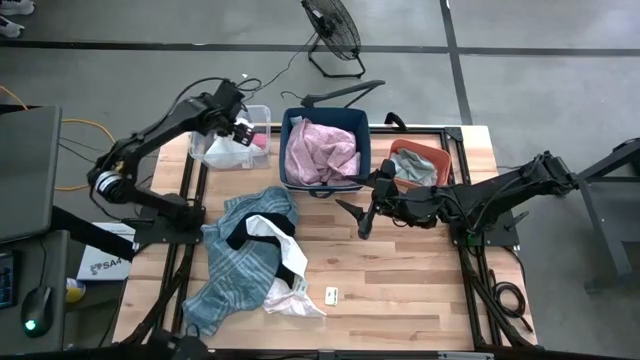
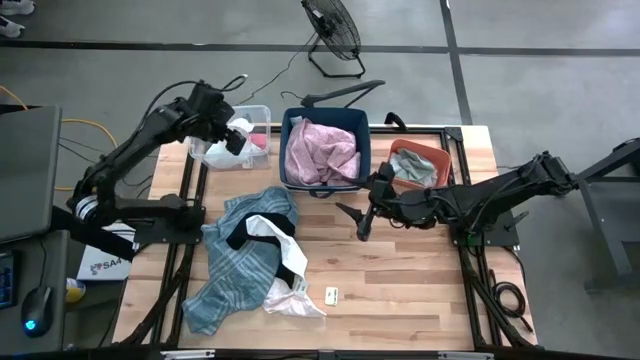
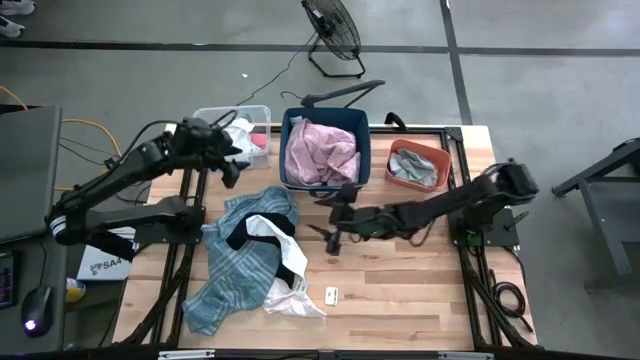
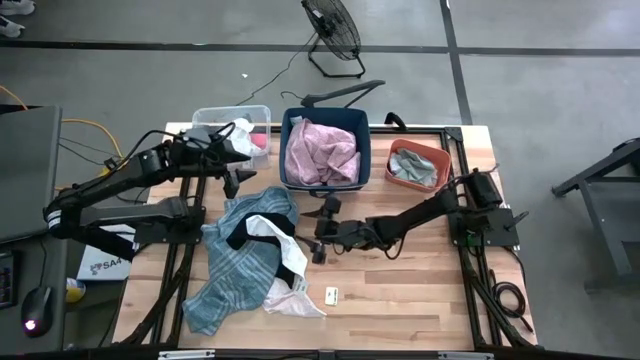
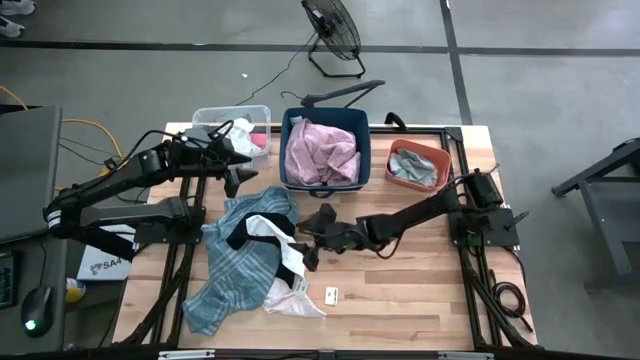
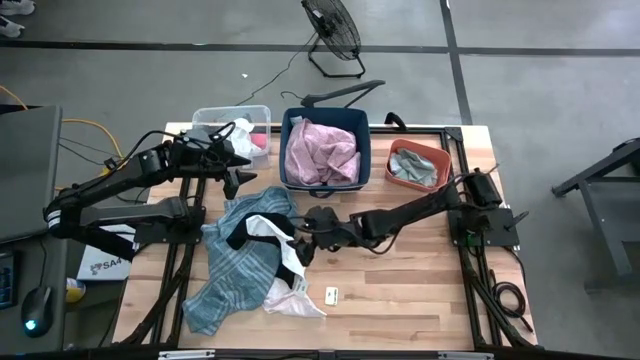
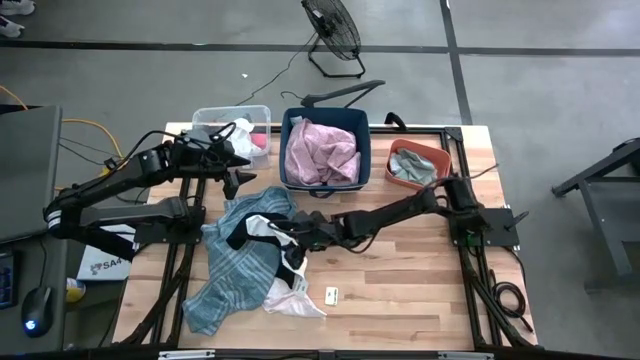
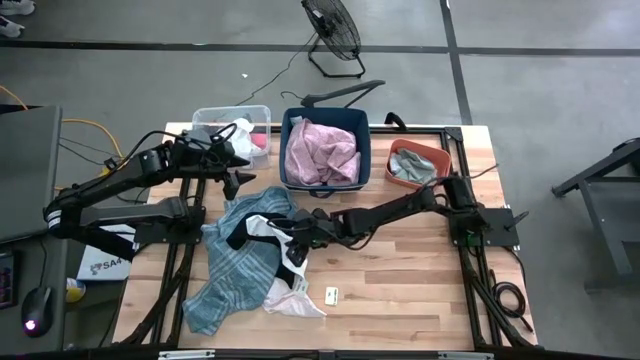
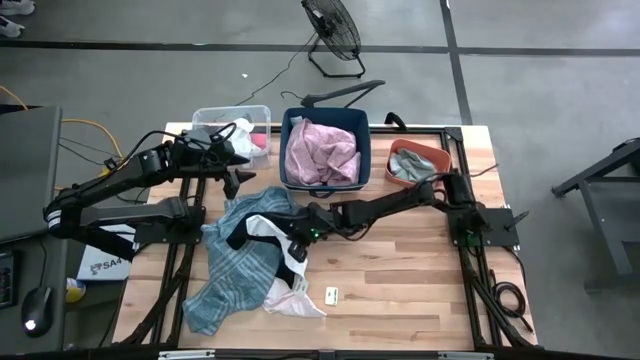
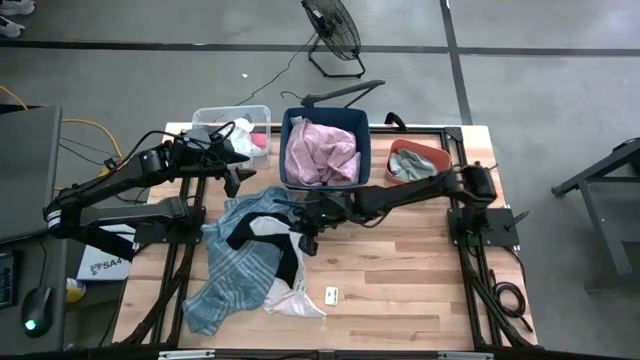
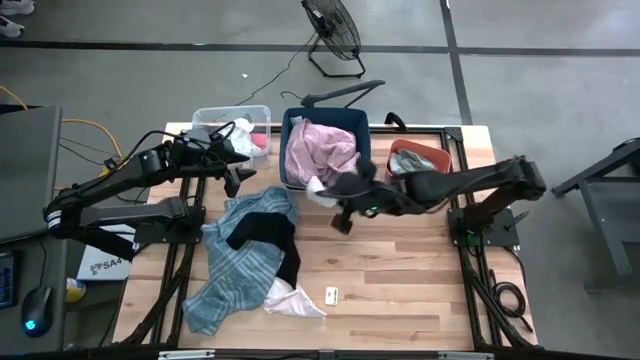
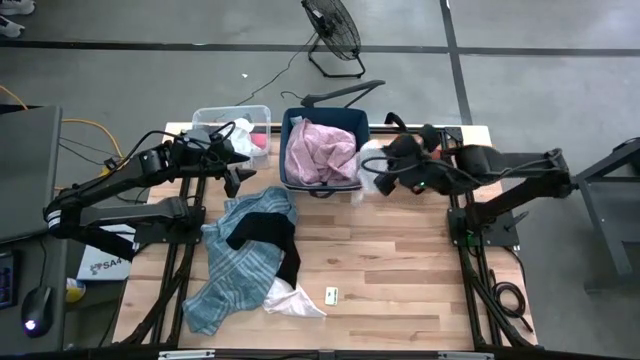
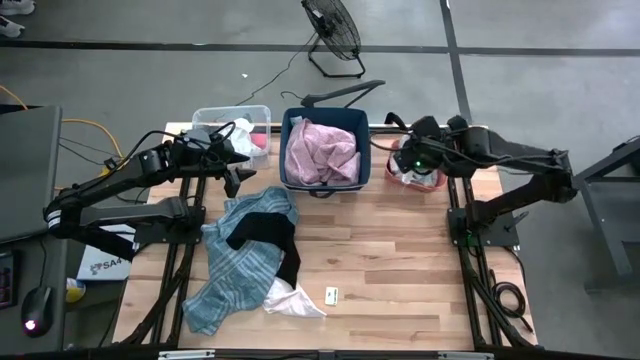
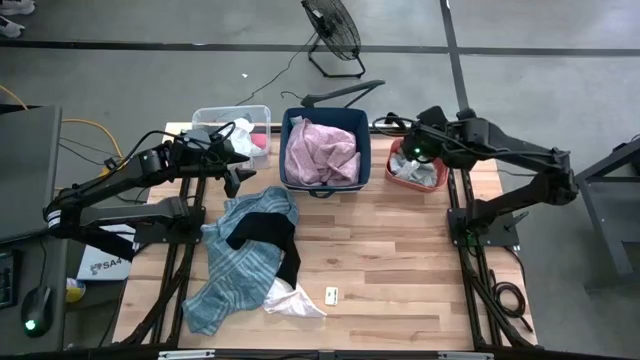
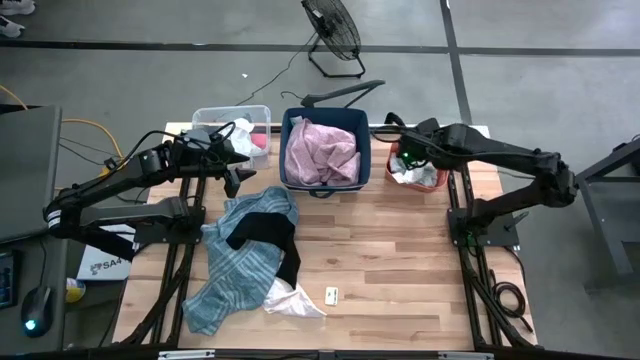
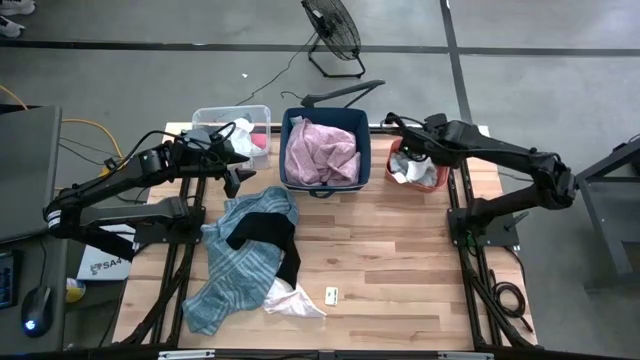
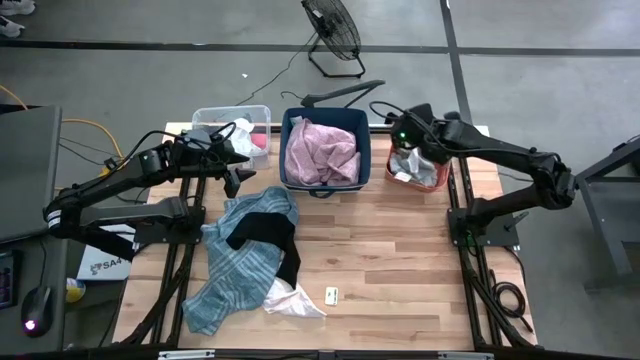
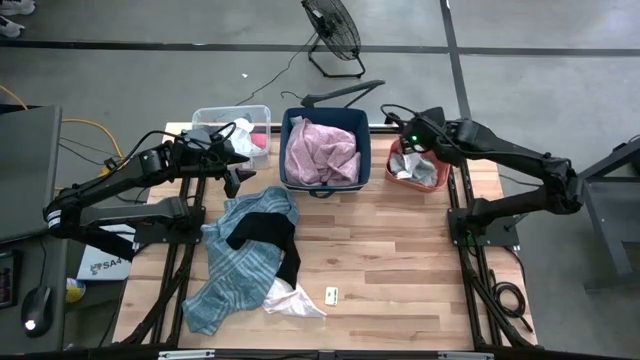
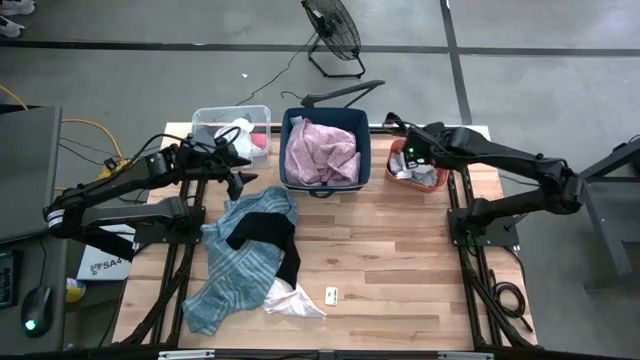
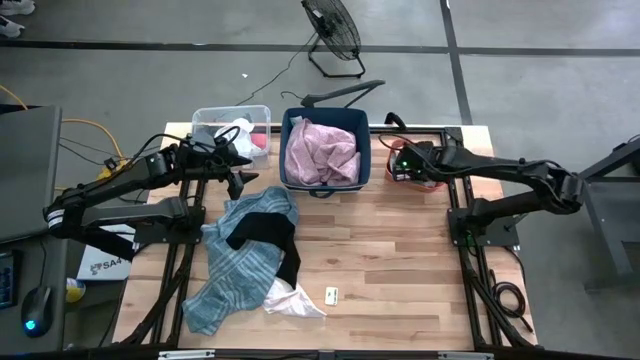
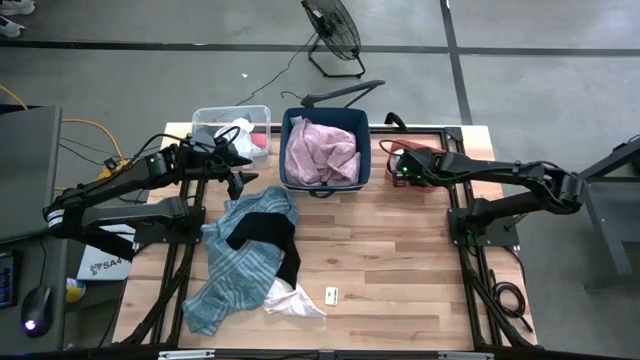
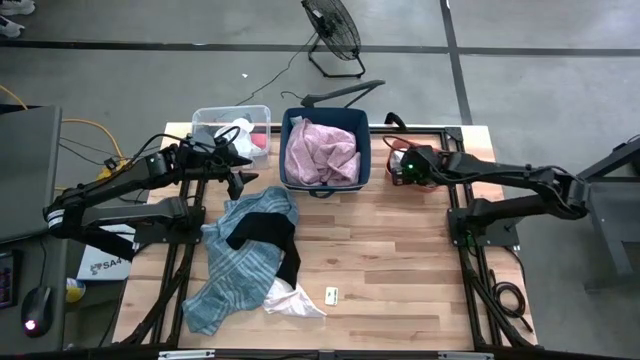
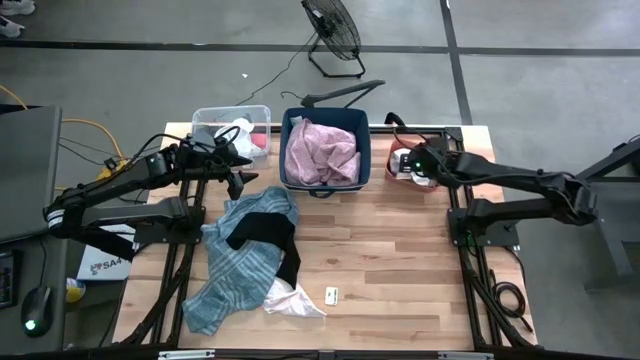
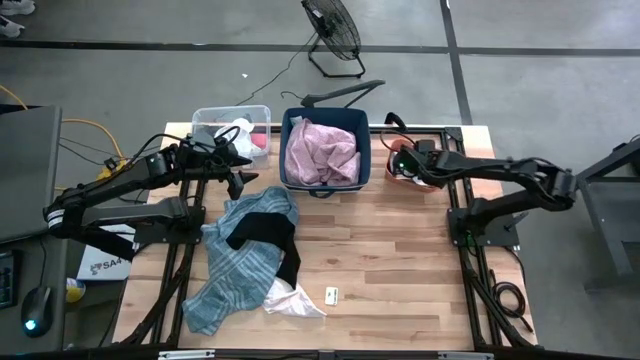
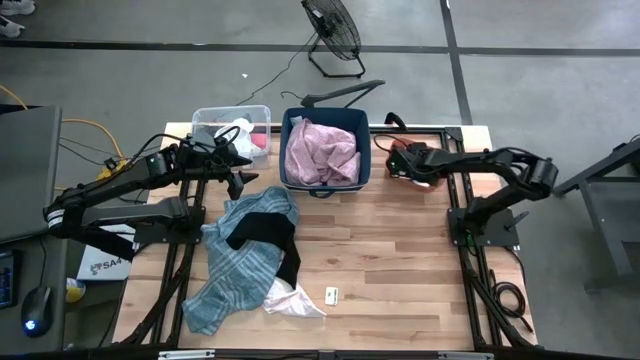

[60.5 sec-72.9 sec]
Task: Pick & Place Cloths
Put the white sock into the orange bin

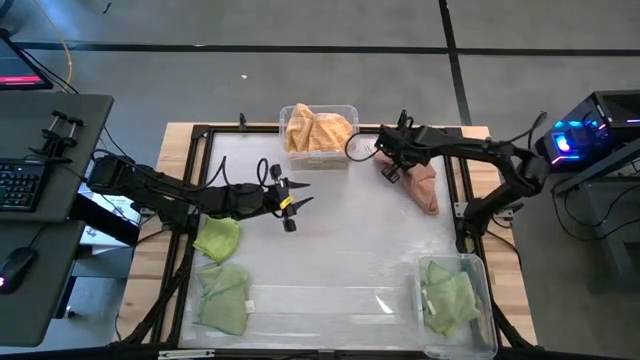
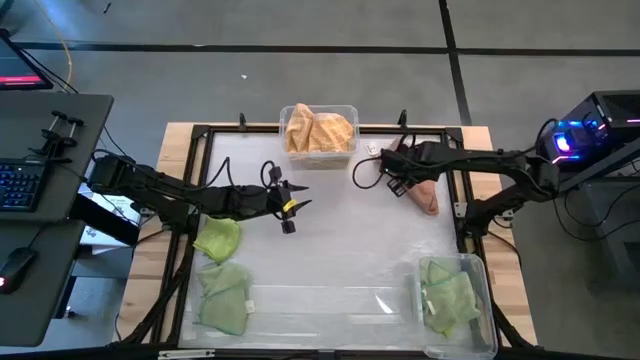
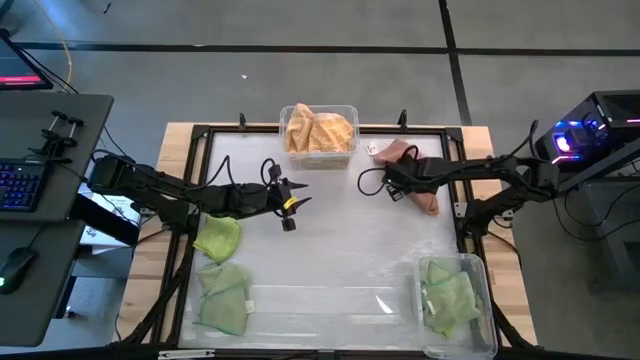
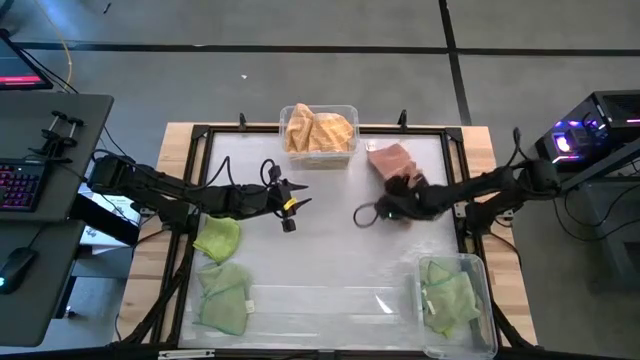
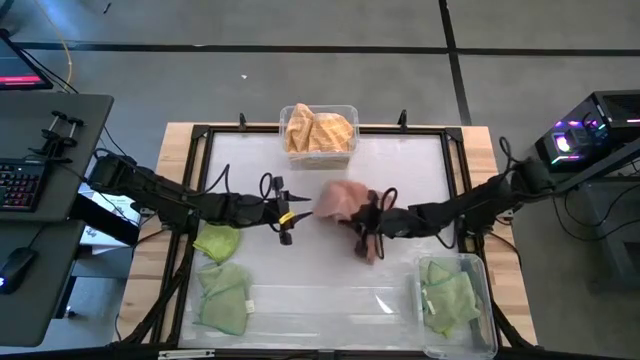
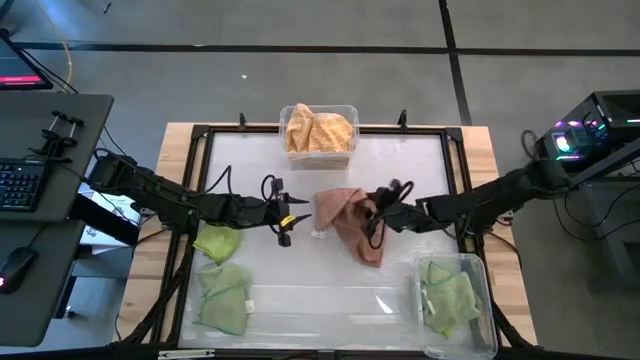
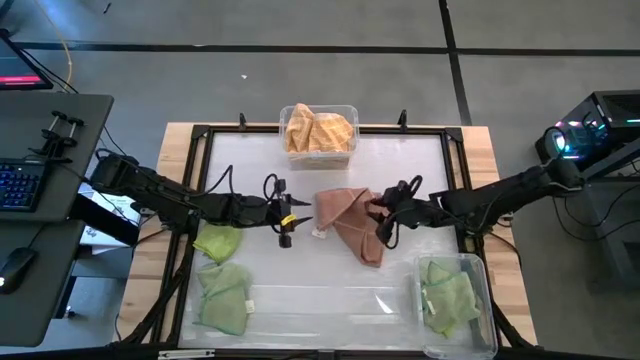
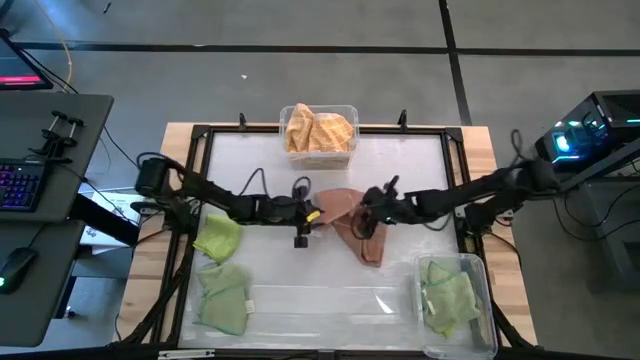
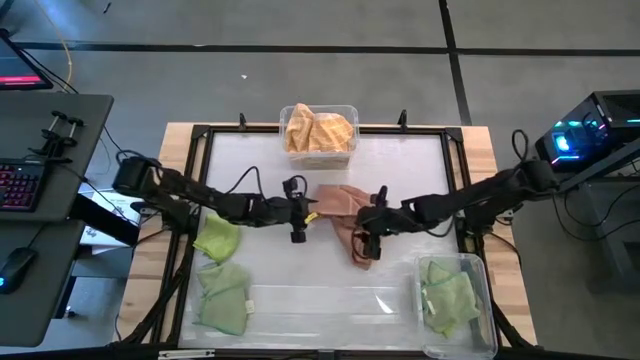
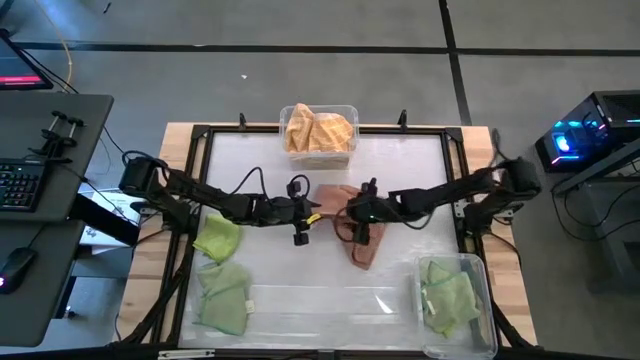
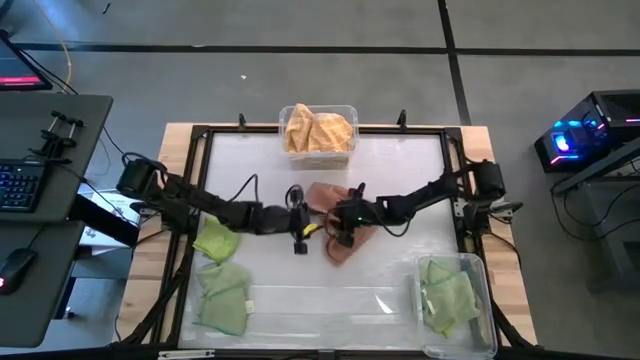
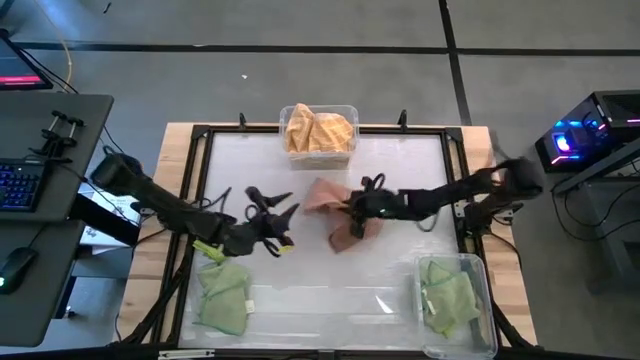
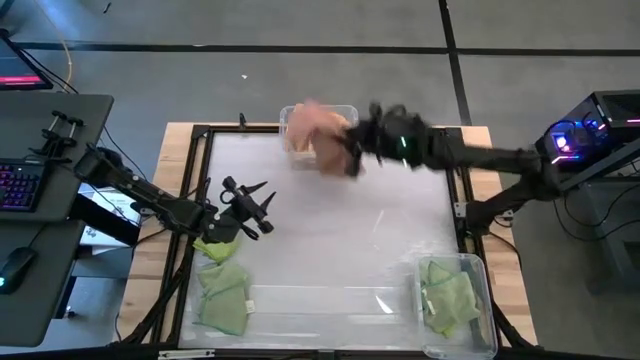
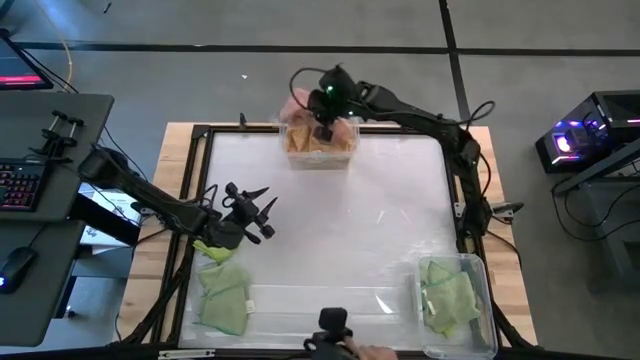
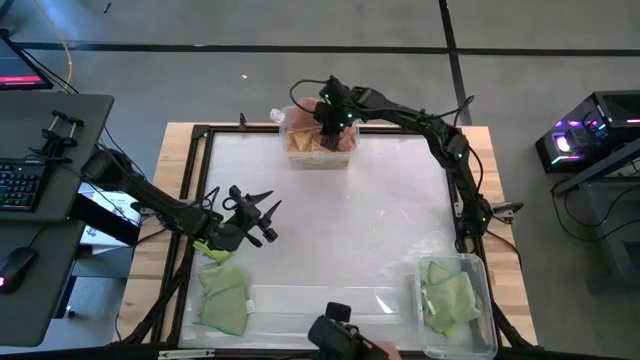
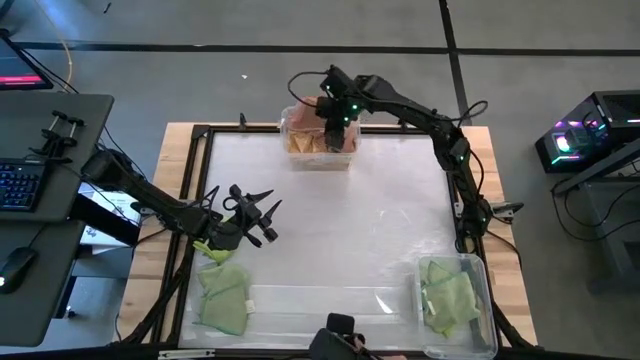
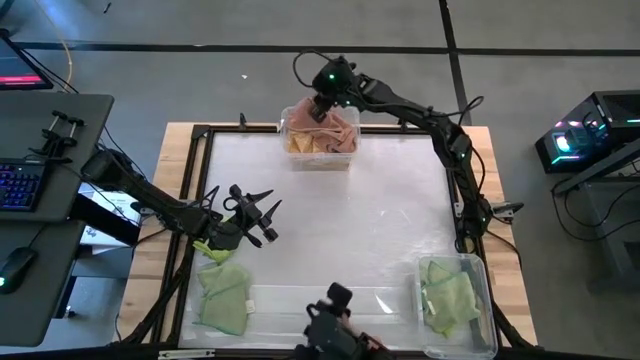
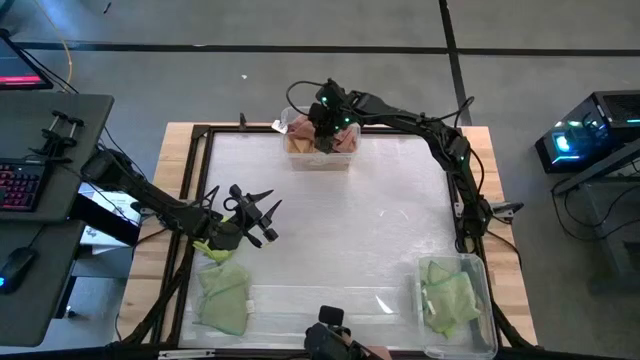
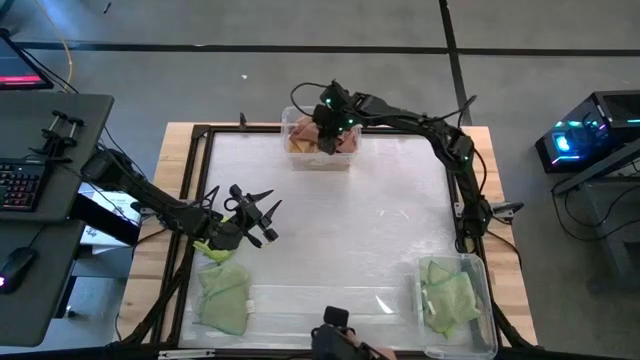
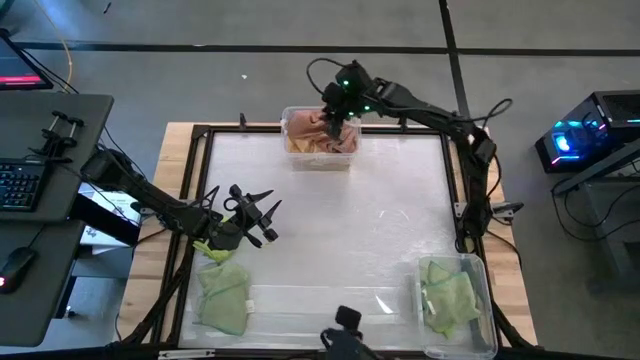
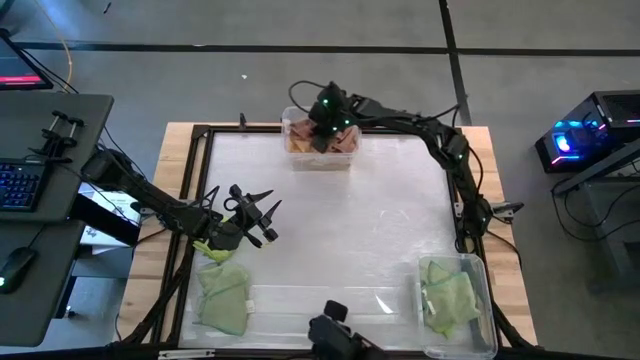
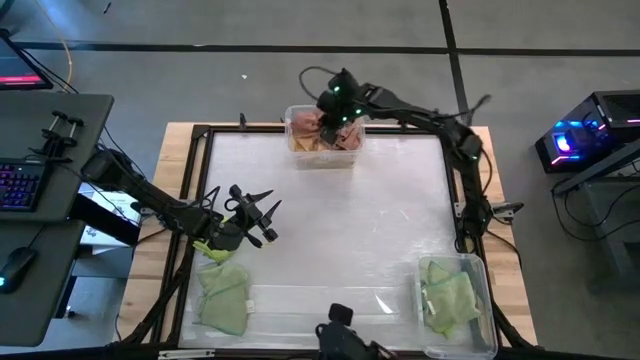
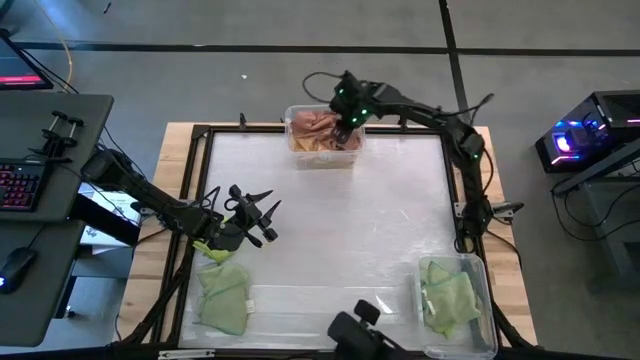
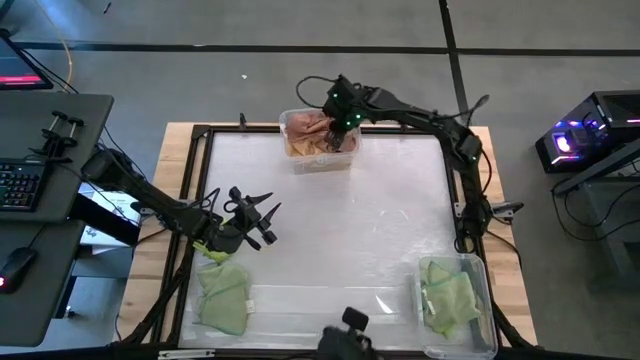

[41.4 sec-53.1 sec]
Task: Sort towels by color in basket
Put the brown towel into the top transparent bin
